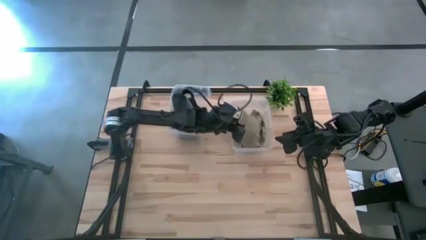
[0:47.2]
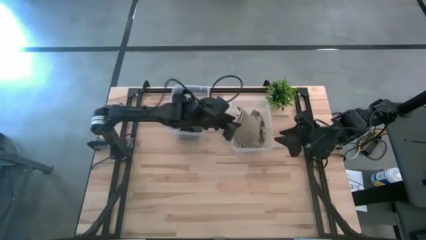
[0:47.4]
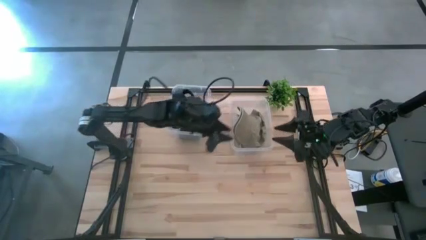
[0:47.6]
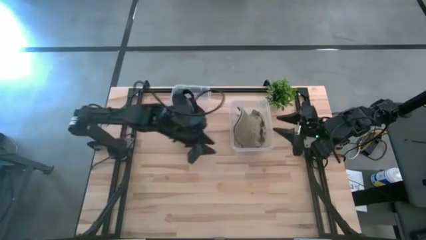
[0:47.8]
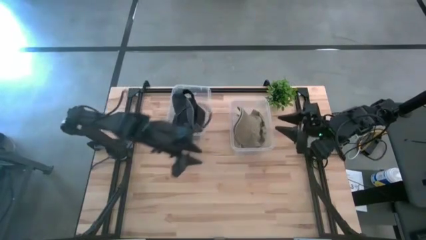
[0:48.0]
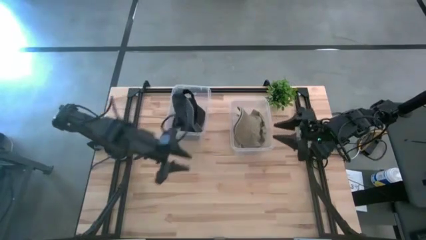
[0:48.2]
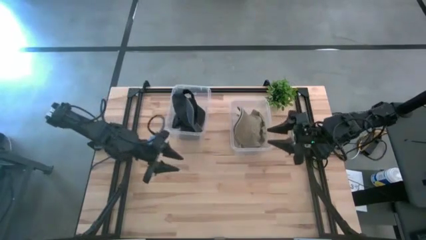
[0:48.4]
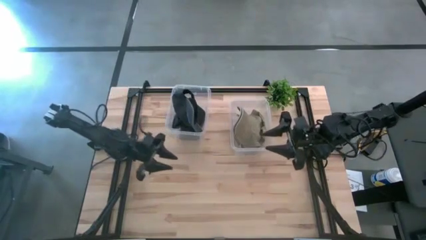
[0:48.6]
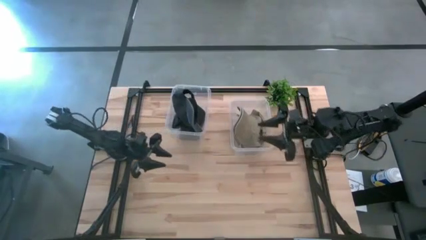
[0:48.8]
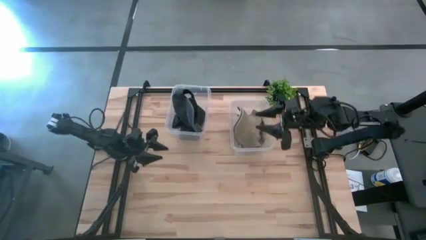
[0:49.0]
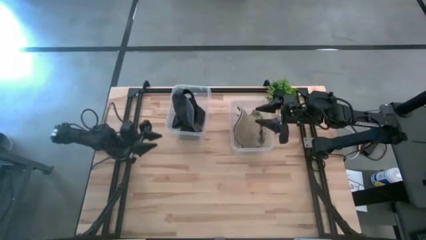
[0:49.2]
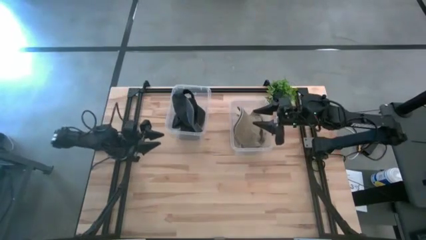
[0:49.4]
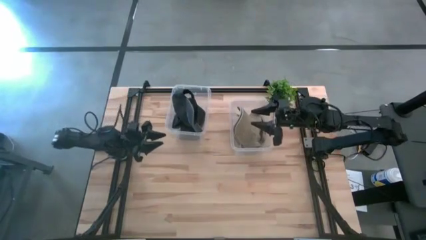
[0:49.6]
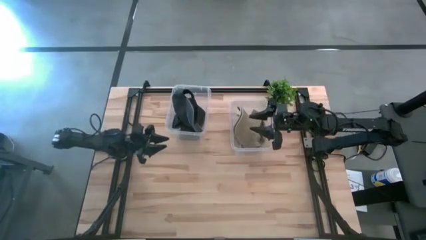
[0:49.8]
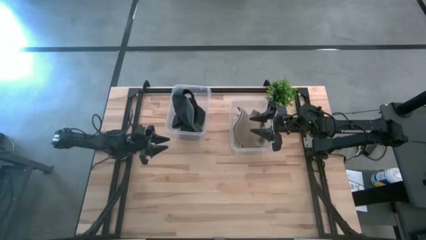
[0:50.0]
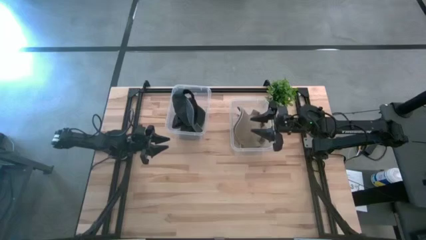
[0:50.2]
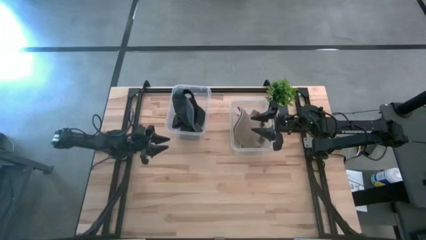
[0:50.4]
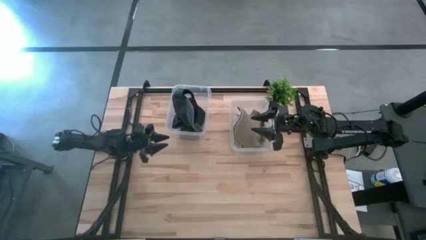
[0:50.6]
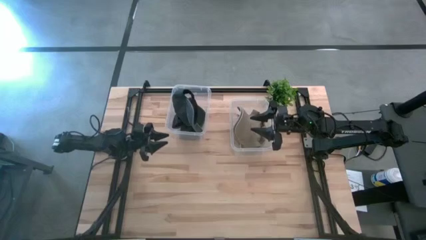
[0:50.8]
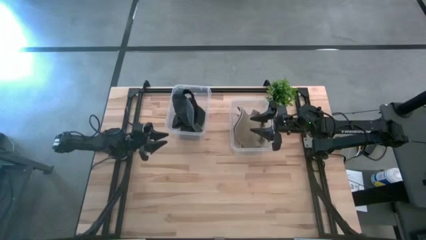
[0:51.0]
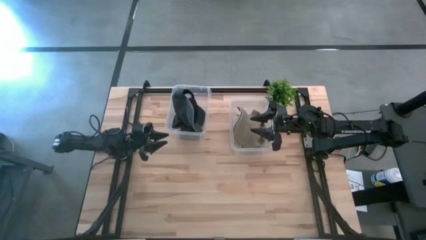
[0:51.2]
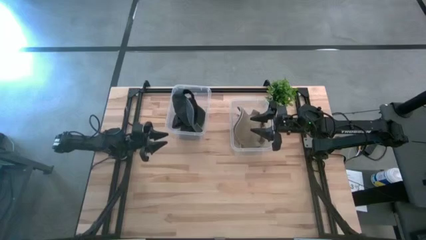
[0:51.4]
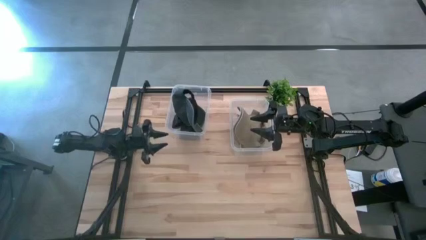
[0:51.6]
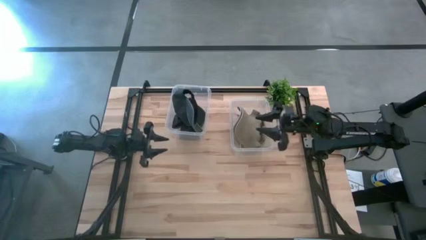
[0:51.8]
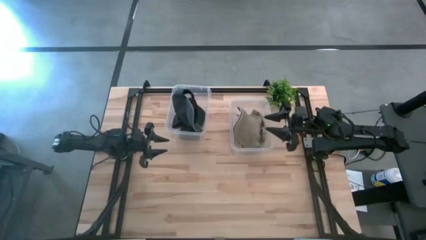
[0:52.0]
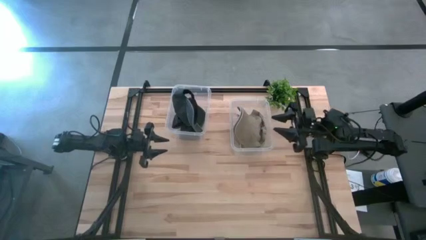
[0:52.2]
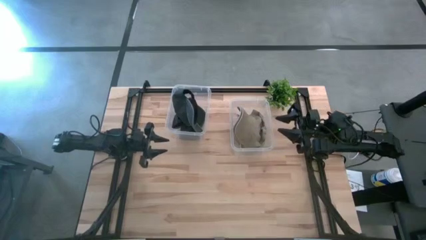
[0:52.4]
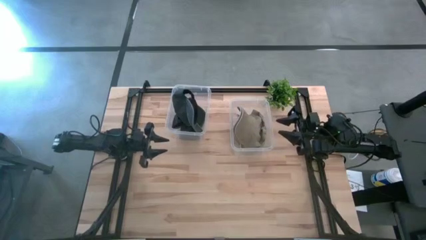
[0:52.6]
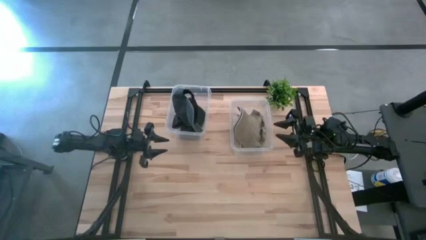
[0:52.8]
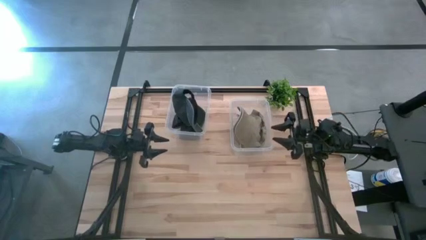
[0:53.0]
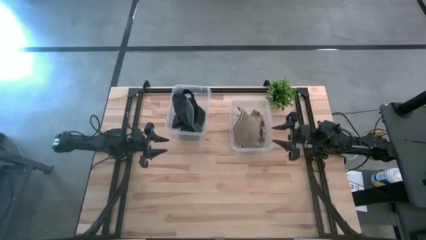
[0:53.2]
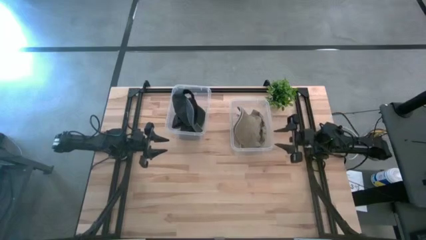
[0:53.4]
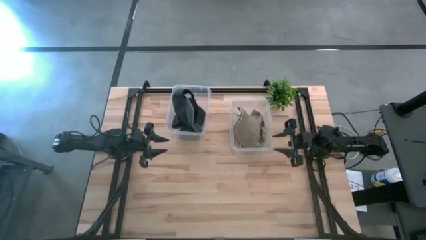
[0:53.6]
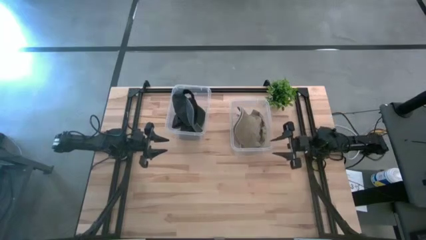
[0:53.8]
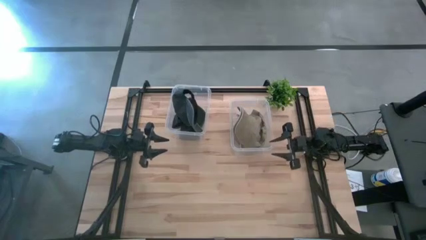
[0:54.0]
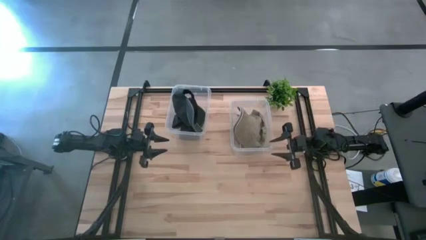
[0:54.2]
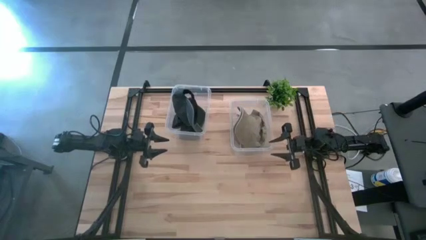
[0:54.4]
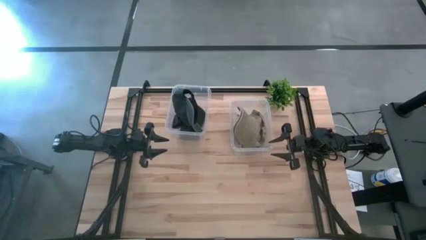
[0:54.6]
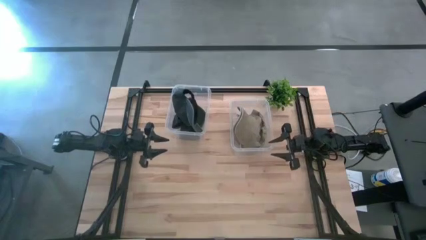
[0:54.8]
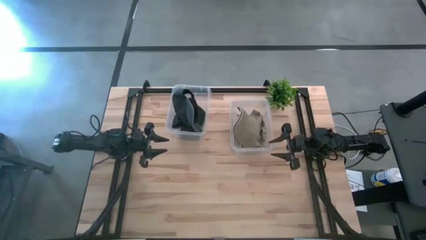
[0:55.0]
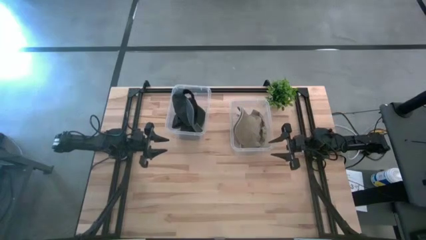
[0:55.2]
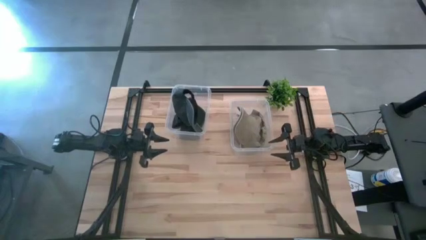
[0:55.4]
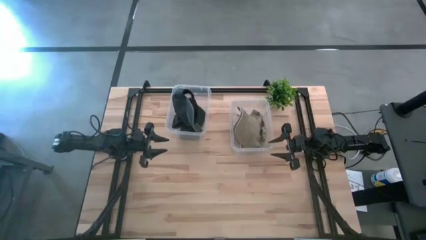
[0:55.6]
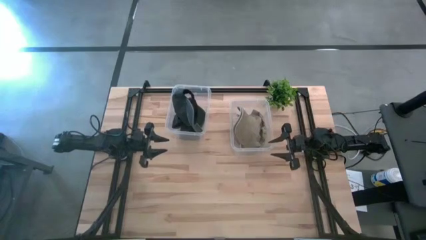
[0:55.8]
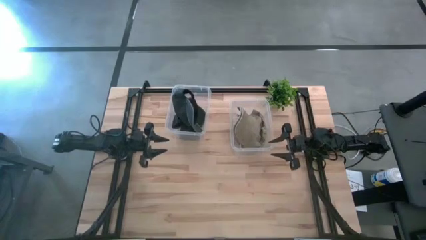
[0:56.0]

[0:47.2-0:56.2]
Task: Pick & Place hat
Return to Home Position

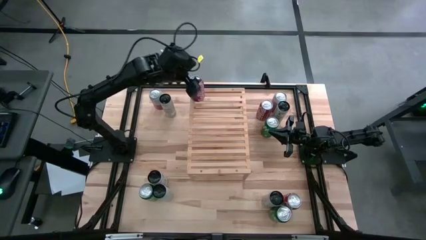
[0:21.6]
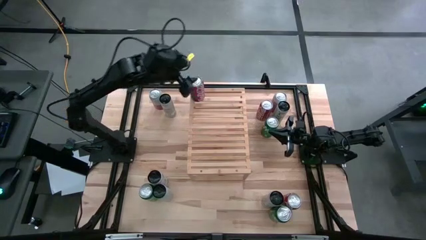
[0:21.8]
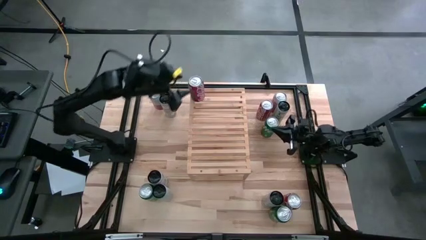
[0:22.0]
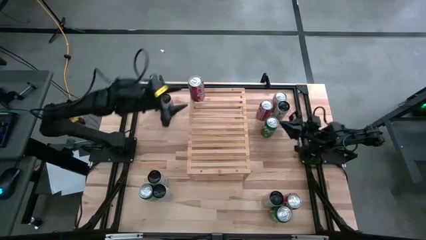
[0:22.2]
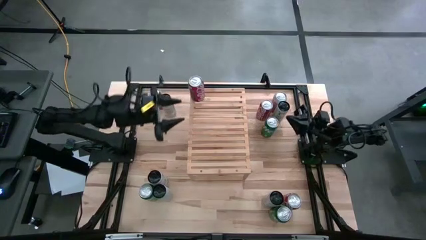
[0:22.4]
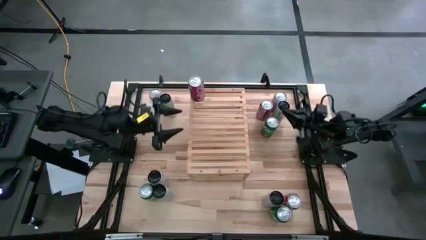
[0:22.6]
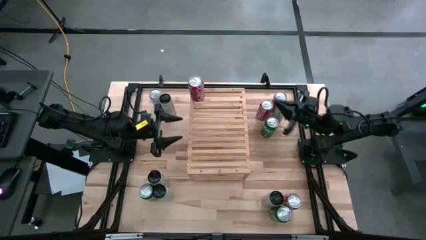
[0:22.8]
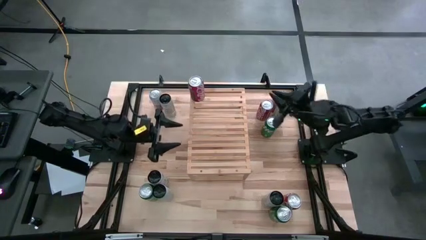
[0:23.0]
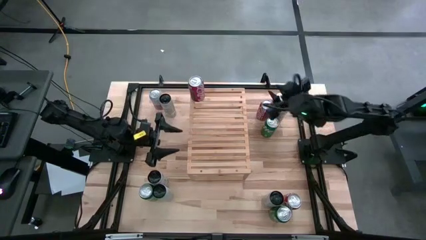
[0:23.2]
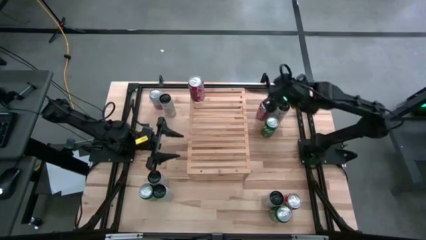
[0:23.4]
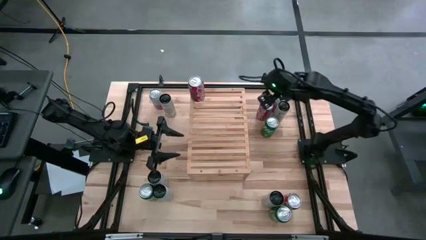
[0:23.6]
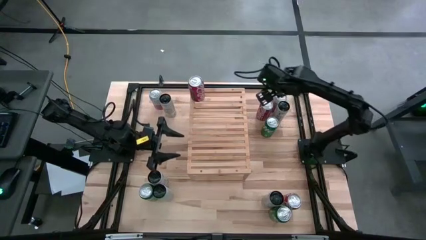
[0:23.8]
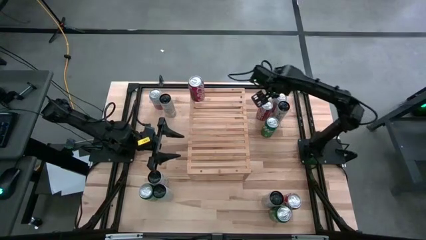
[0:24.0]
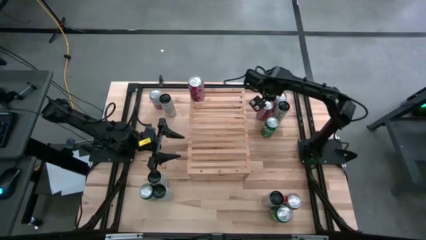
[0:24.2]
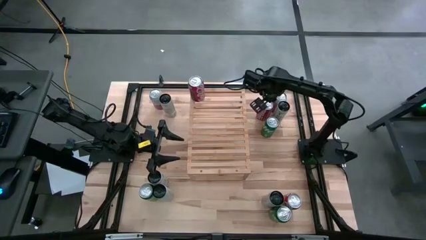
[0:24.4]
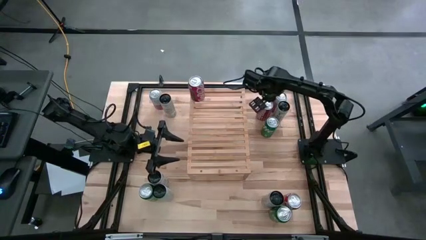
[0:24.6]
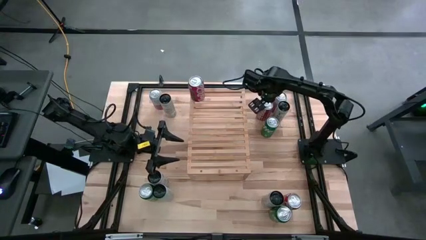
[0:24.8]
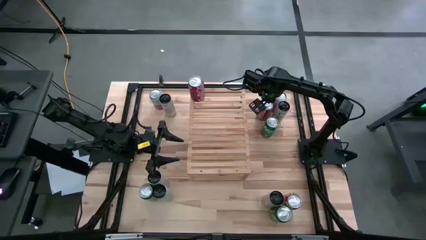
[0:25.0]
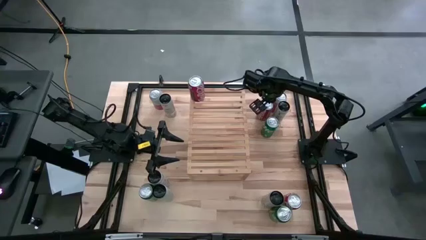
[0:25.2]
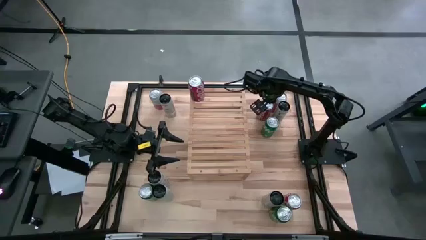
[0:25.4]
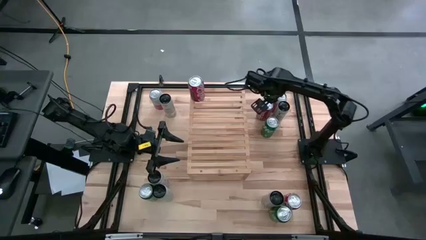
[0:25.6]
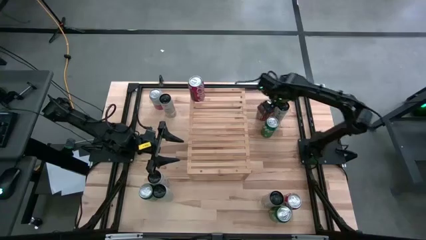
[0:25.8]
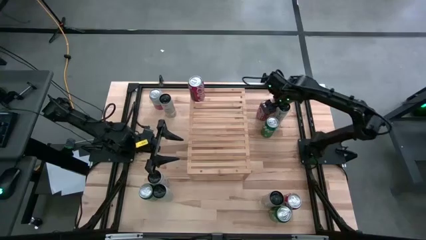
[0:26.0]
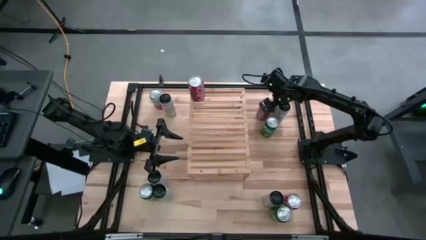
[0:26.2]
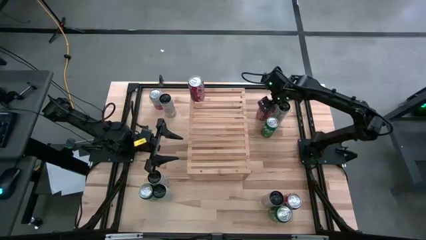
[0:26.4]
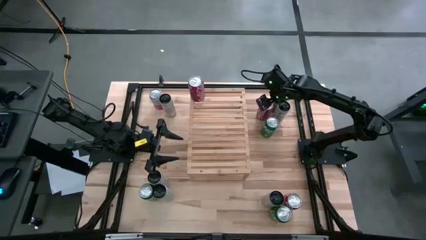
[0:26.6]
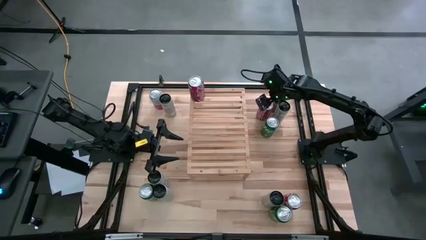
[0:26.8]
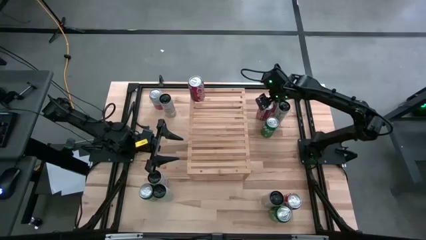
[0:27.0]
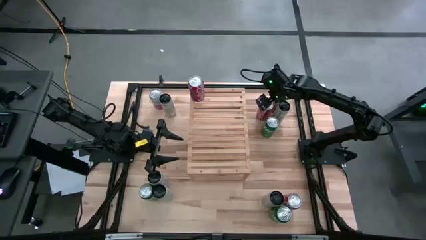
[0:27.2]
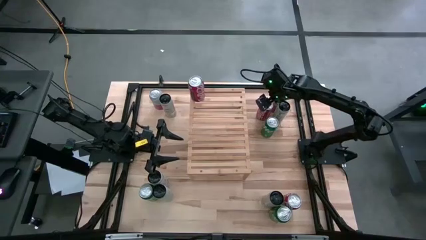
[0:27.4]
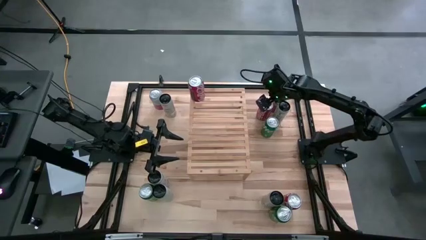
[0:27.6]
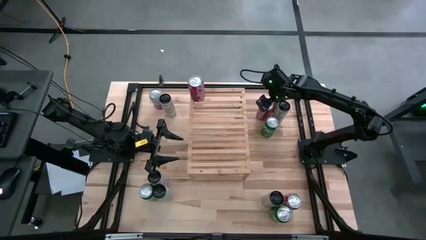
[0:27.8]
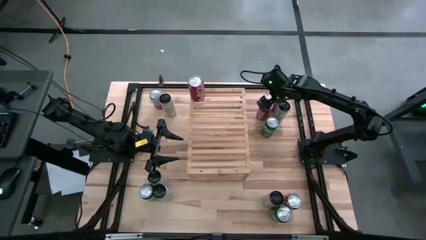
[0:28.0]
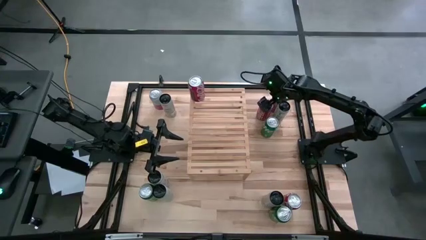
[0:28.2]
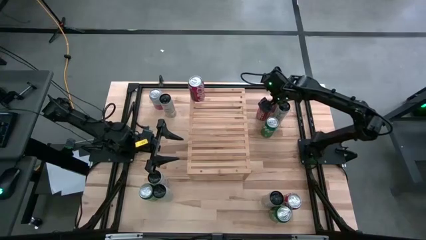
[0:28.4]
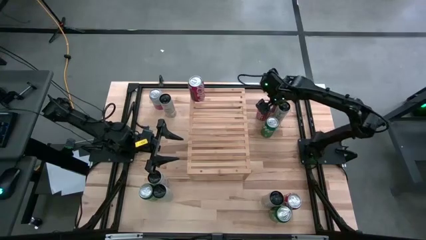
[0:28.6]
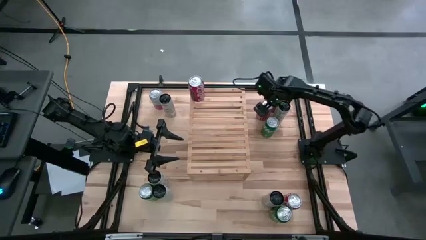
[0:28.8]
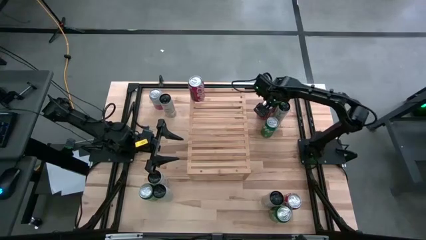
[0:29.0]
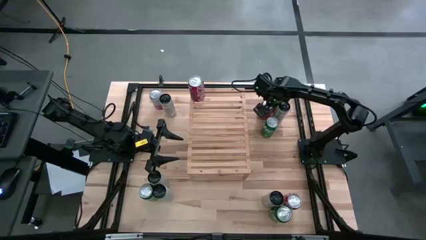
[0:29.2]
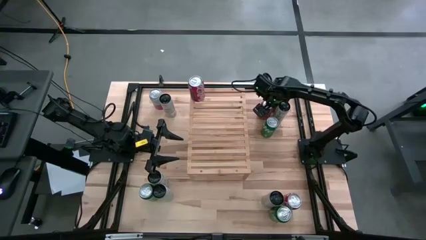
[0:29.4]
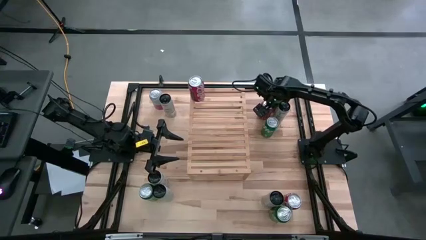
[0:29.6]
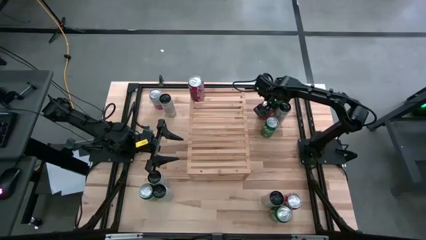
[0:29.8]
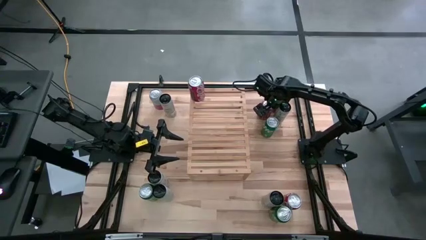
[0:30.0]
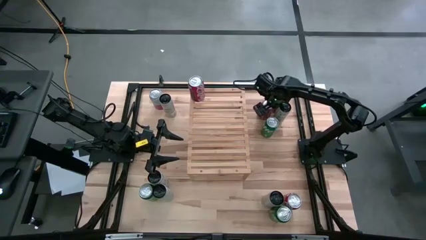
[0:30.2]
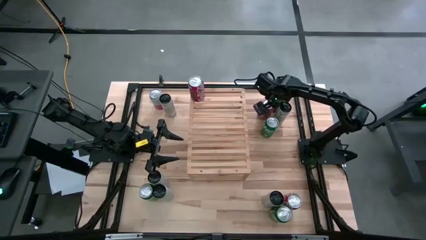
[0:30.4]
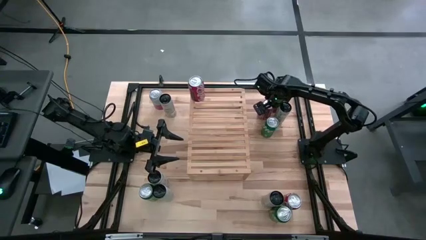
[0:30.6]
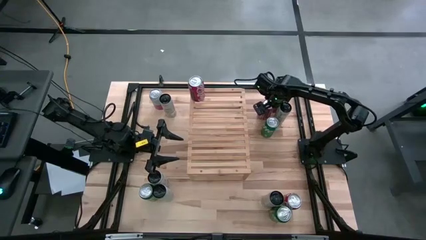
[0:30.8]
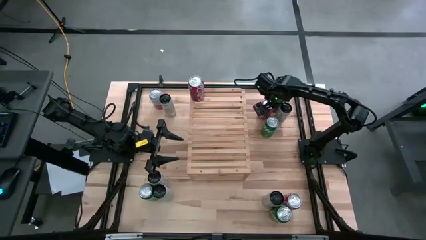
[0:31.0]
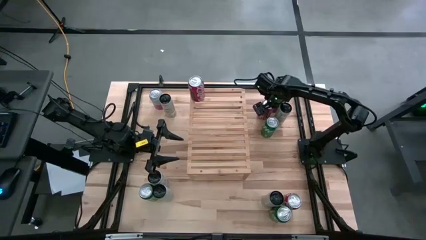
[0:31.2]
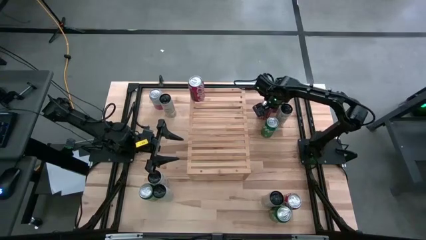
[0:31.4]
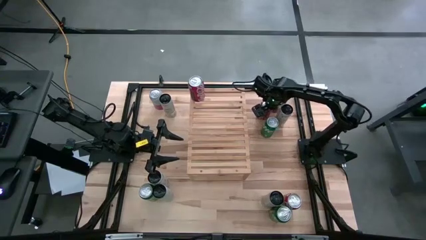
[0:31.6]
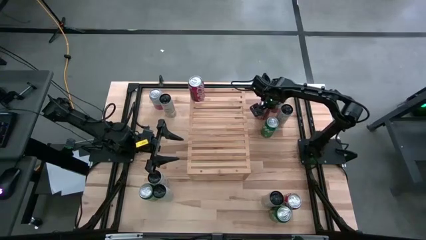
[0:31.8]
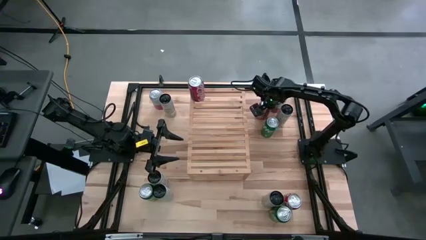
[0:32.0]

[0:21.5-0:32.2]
Task: Place canned beverage on shelf
Align the top right coke soda can with the other coke soda can on the shelf
